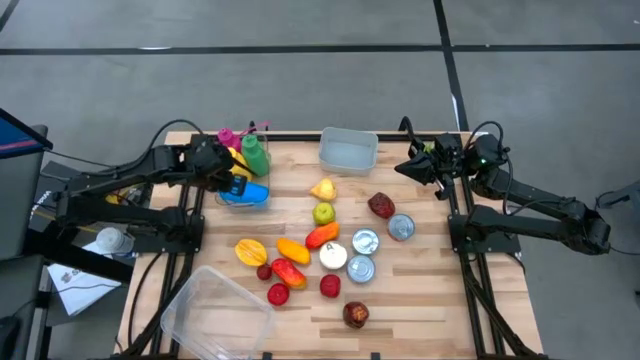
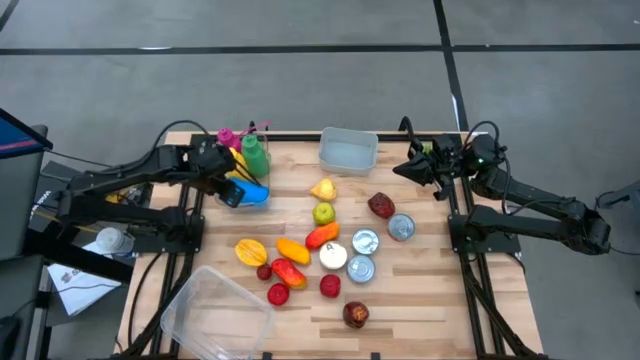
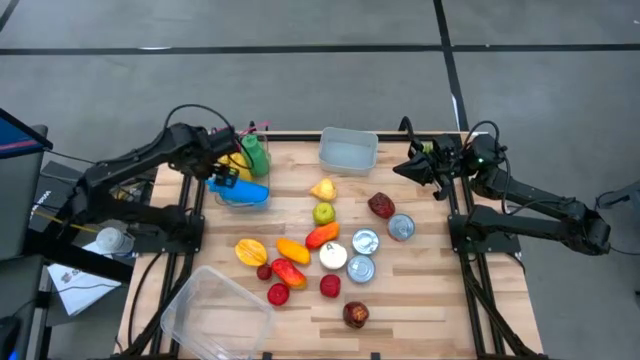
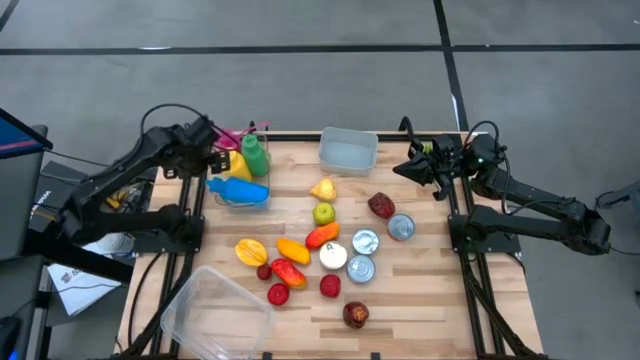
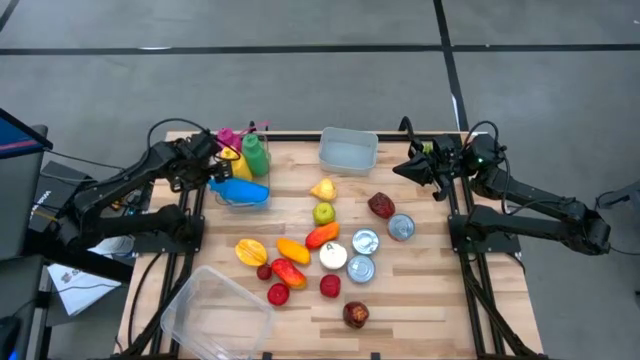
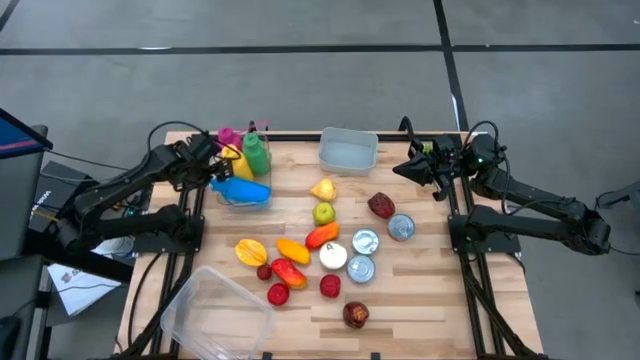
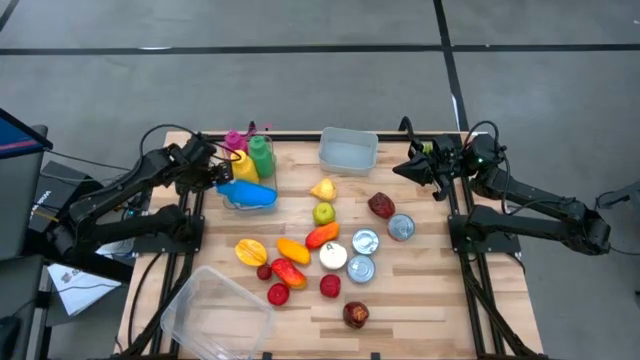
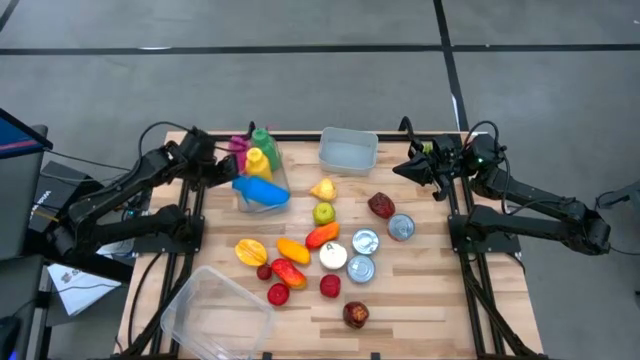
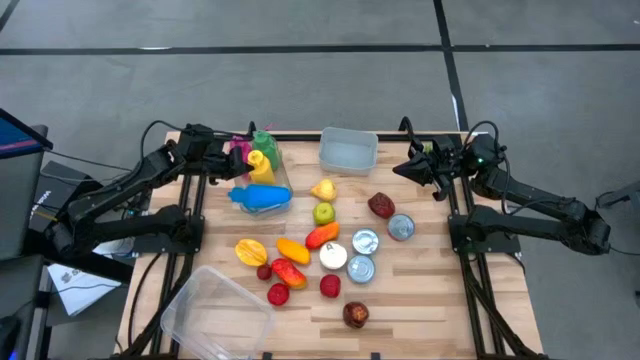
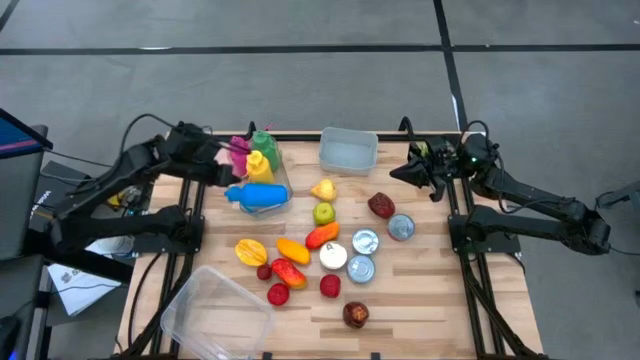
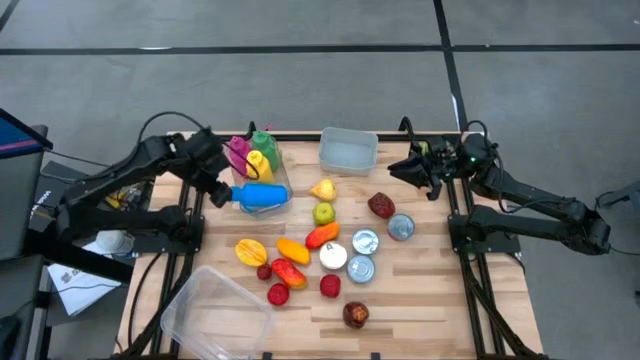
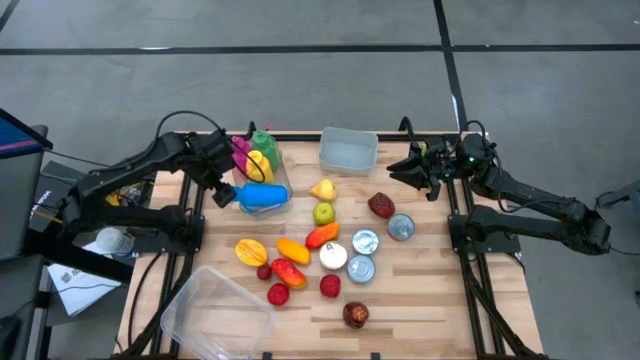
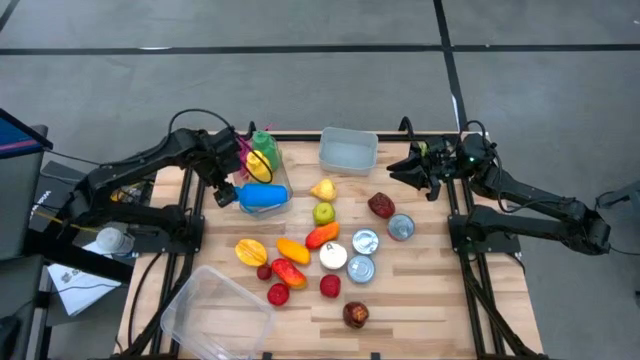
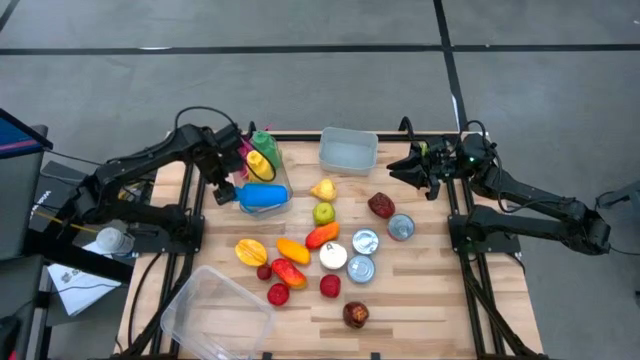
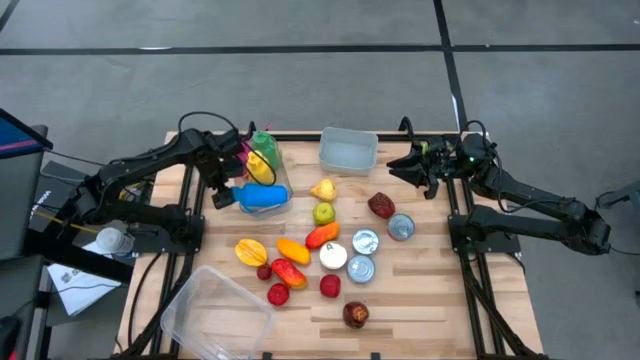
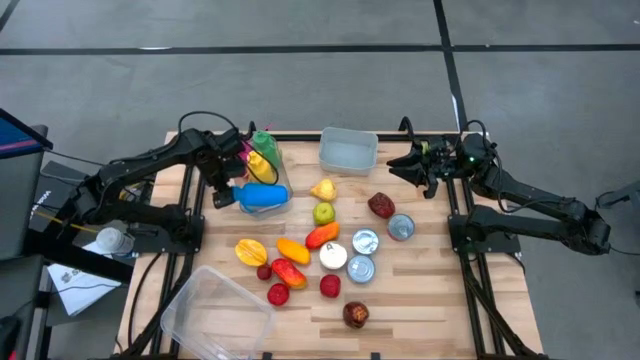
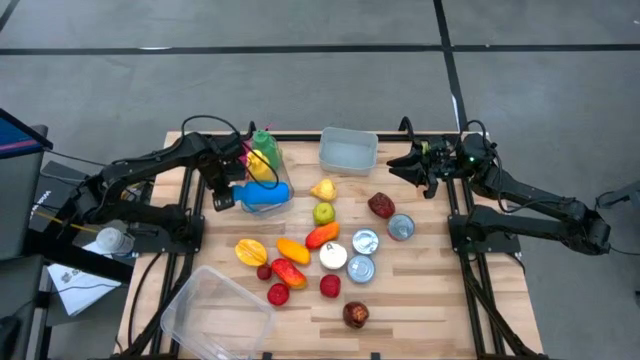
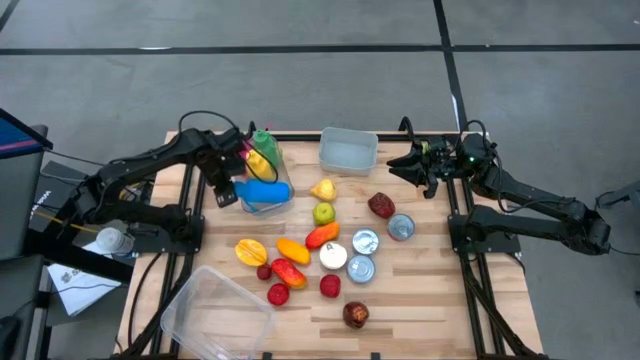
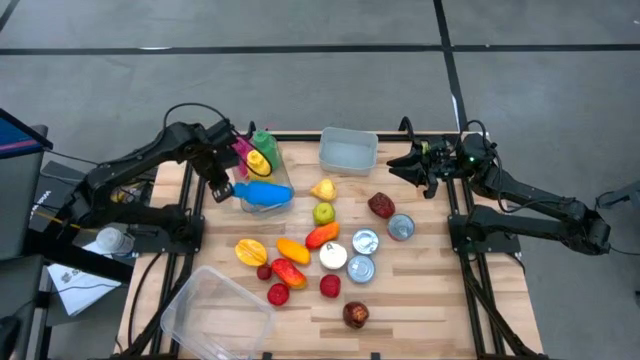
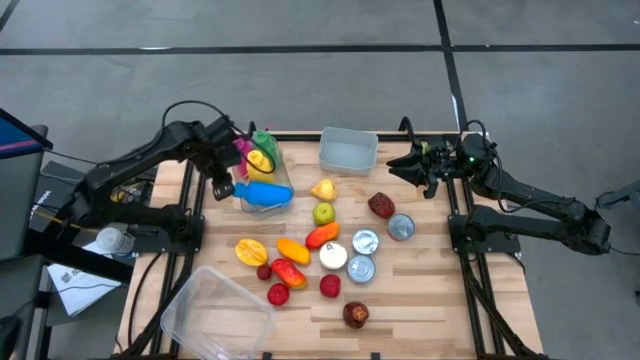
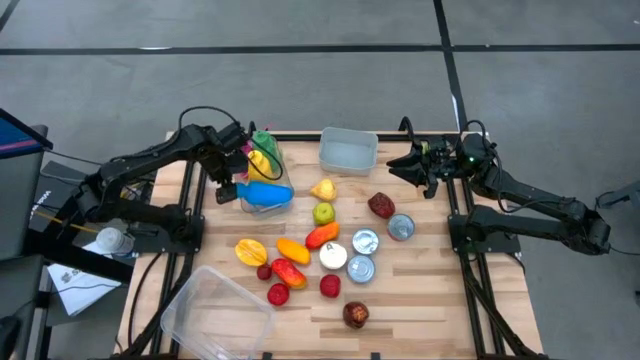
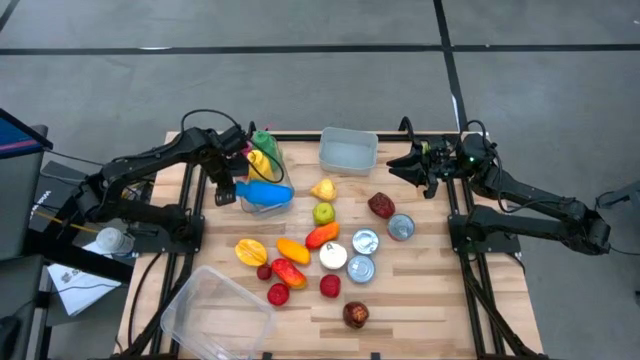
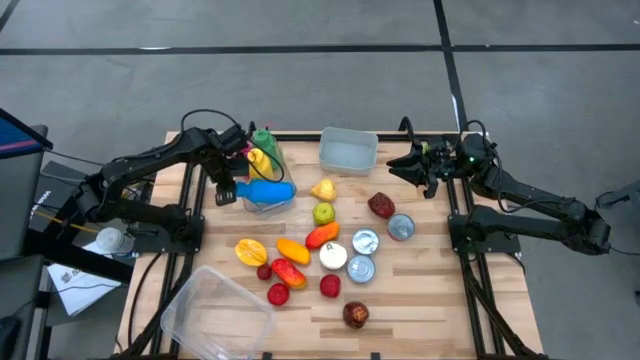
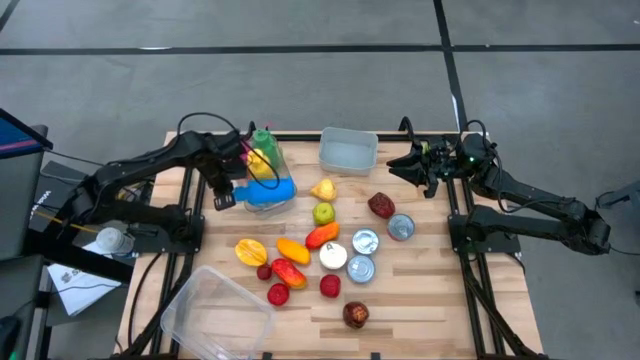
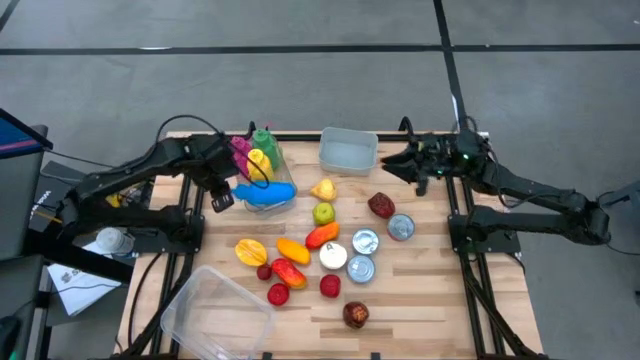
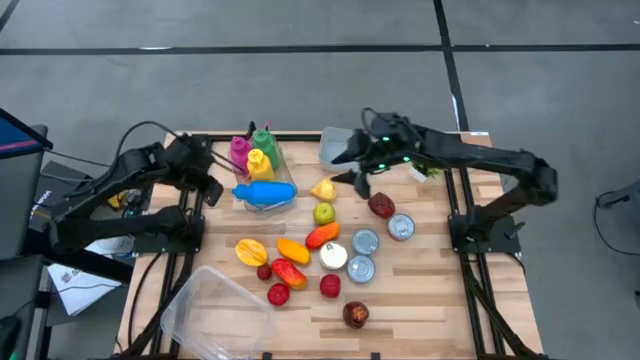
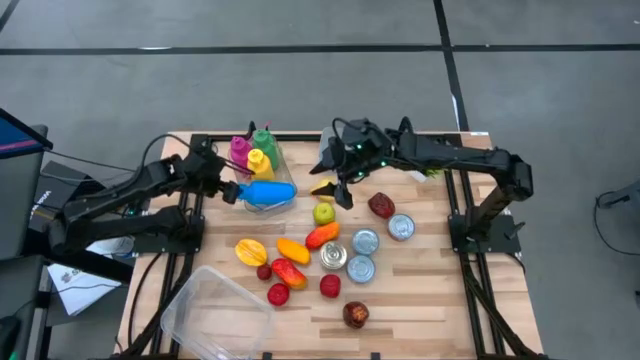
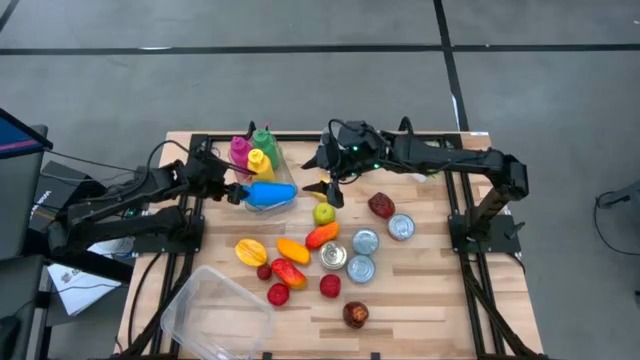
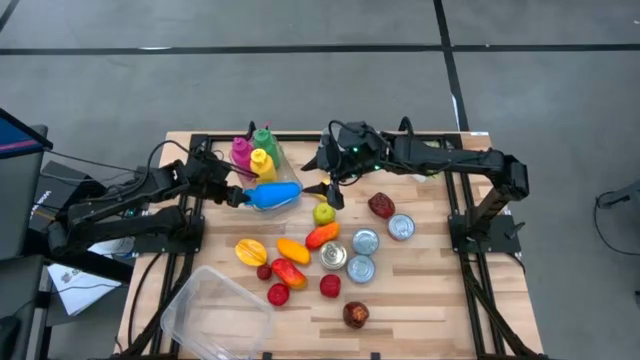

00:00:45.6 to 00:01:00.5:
Task: Pick & Place Food Item
Put the blue water bottle into the transparent bin

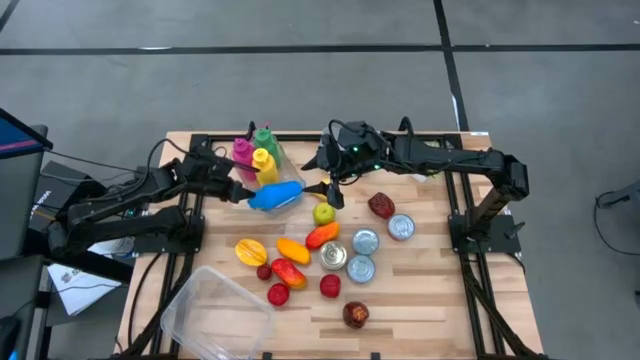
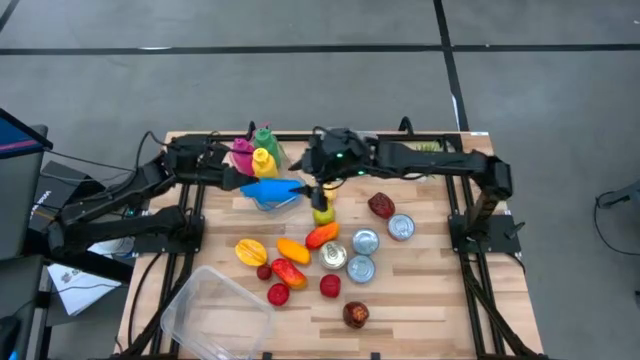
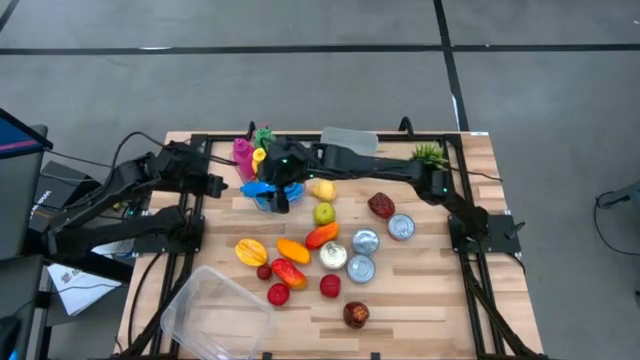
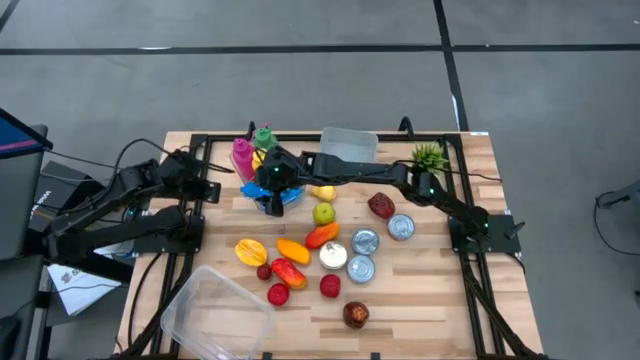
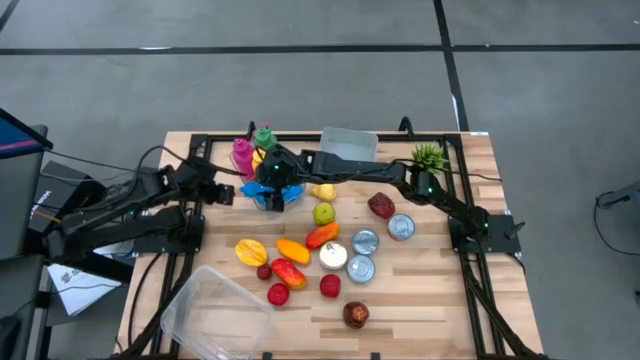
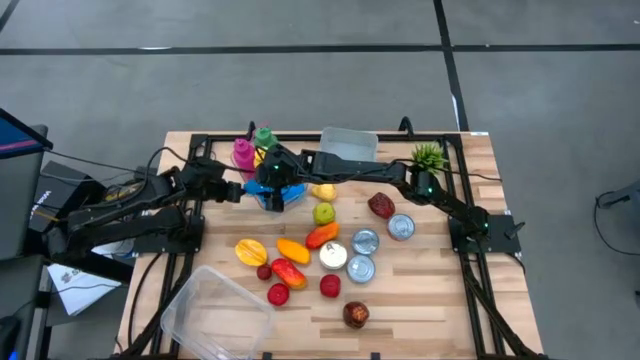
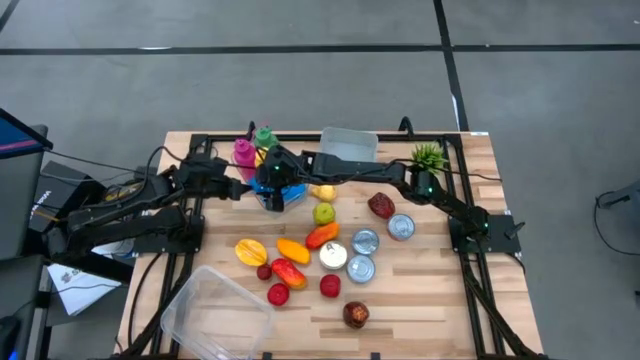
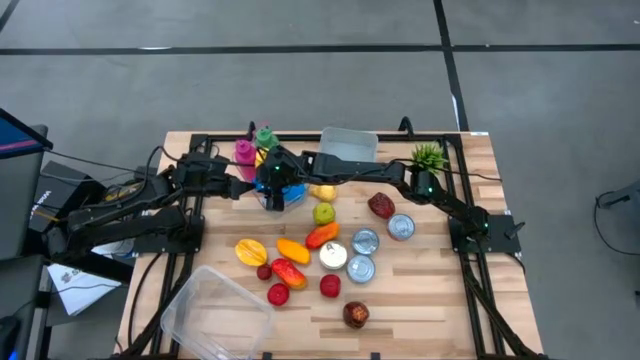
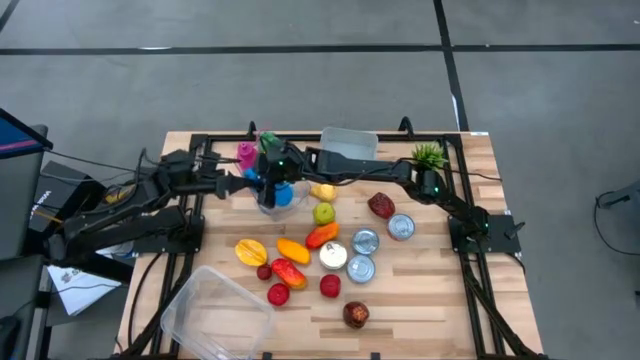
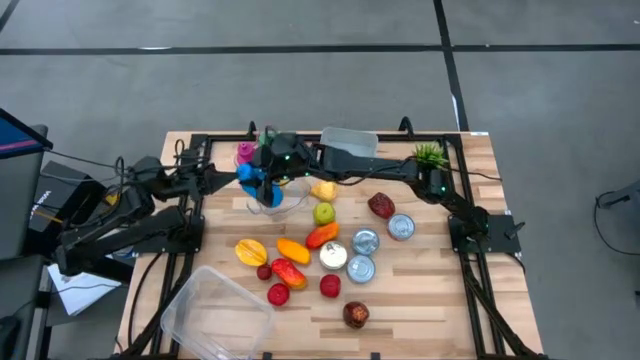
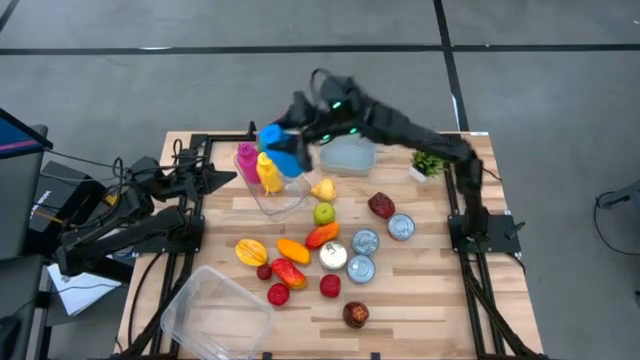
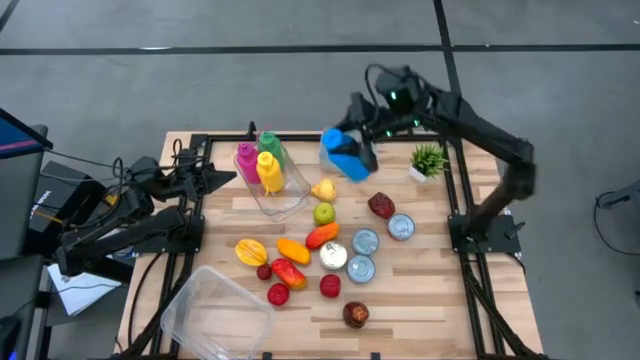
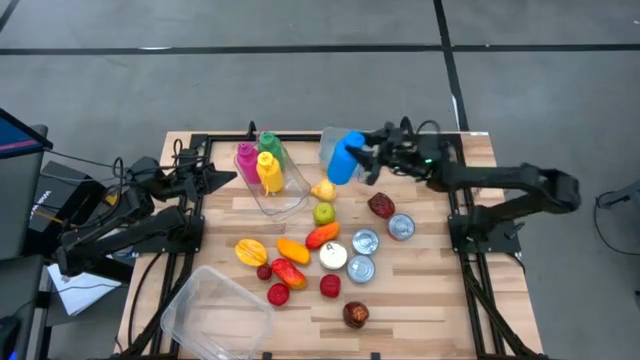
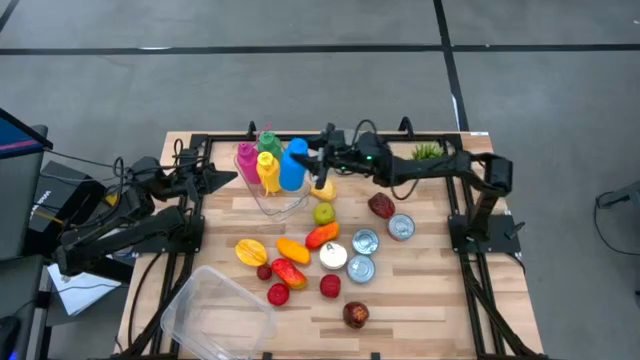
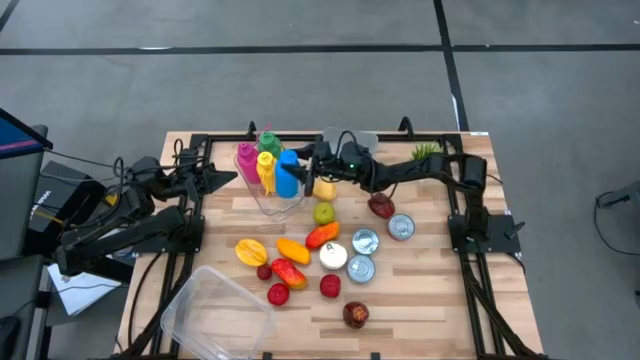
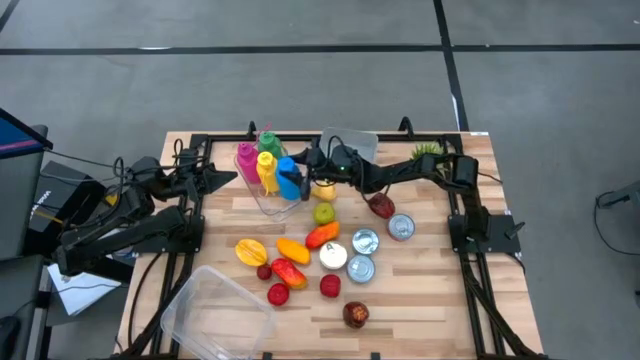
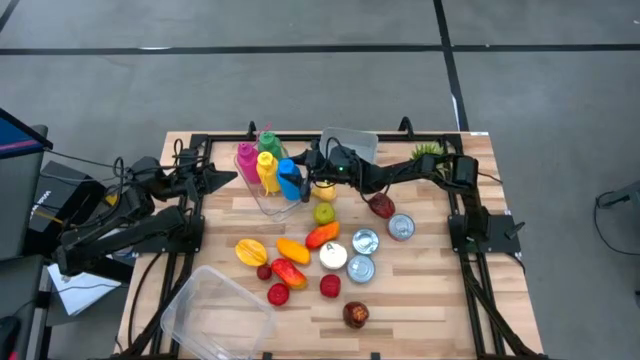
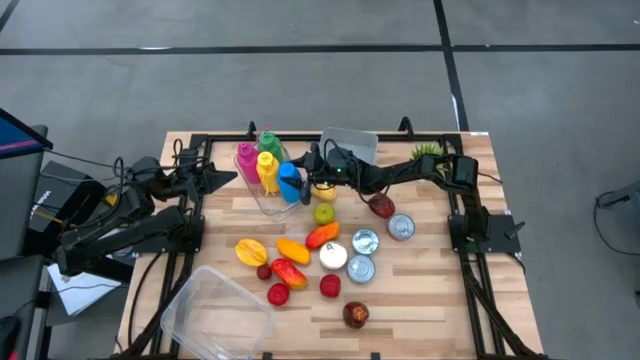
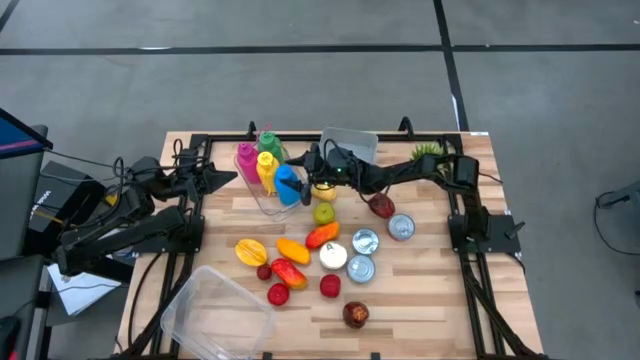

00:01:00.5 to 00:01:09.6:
Put the blue water bottle into the transparent bin
